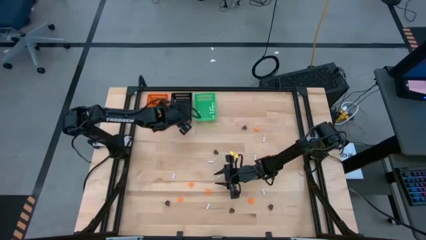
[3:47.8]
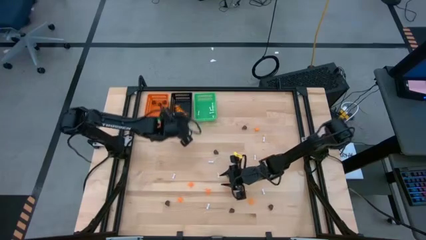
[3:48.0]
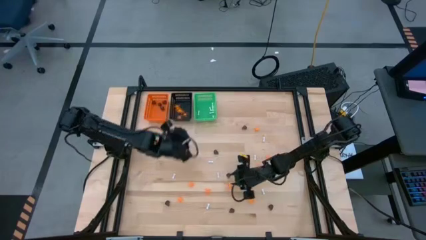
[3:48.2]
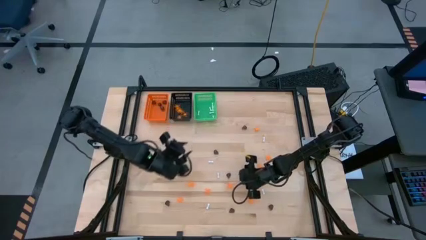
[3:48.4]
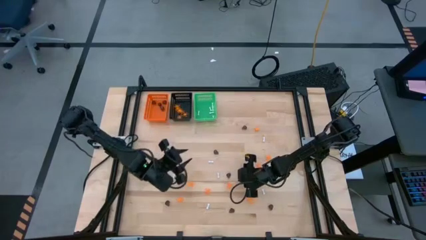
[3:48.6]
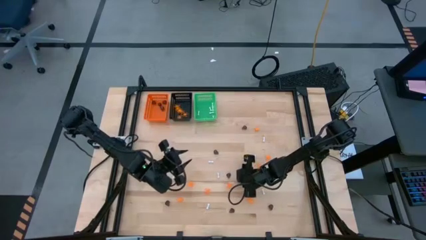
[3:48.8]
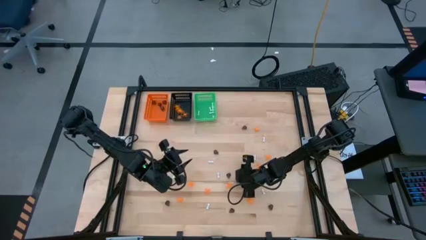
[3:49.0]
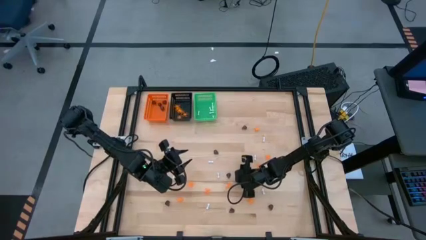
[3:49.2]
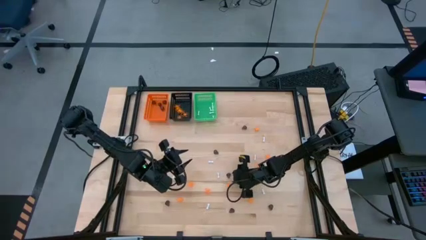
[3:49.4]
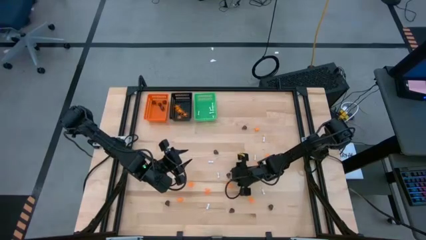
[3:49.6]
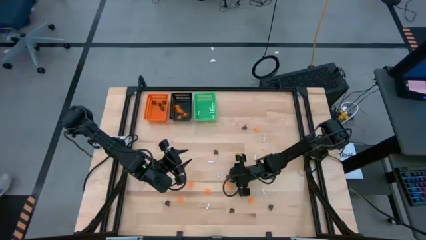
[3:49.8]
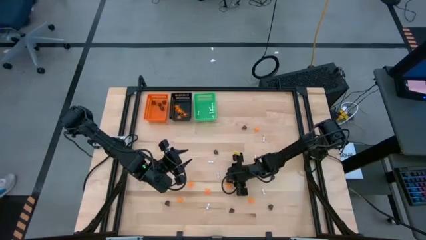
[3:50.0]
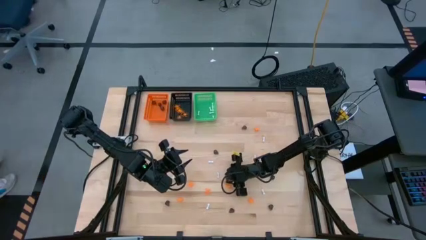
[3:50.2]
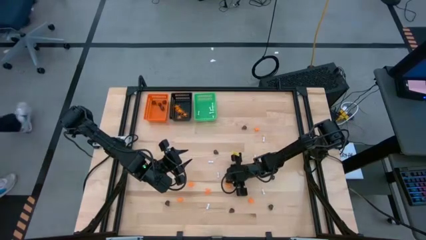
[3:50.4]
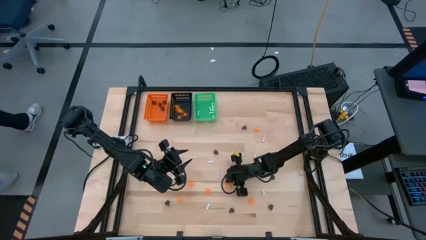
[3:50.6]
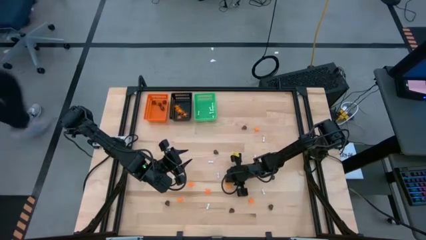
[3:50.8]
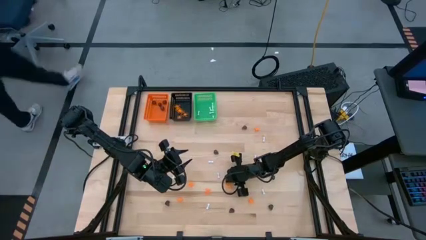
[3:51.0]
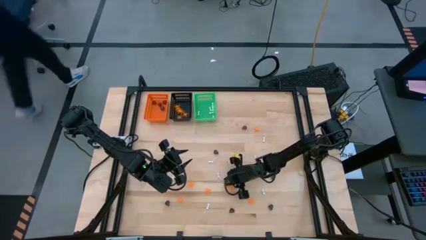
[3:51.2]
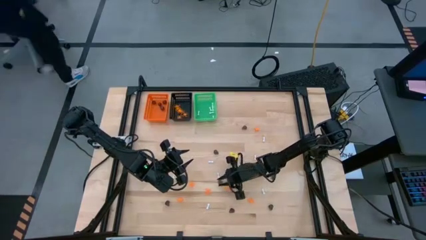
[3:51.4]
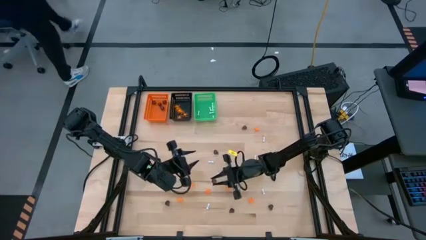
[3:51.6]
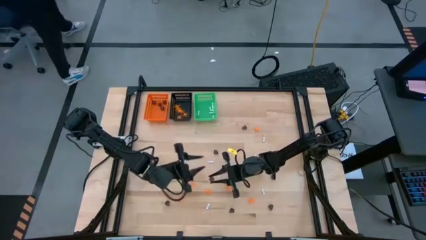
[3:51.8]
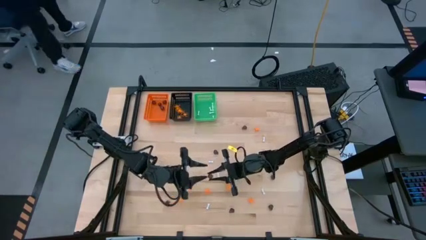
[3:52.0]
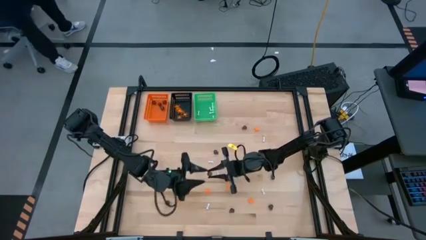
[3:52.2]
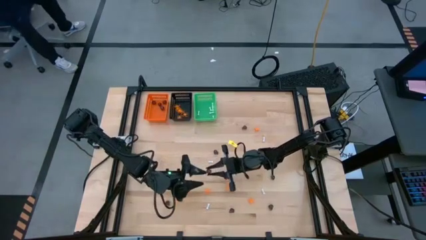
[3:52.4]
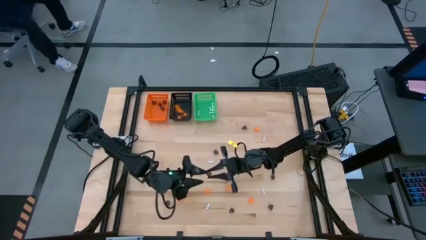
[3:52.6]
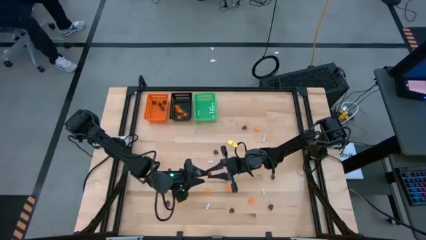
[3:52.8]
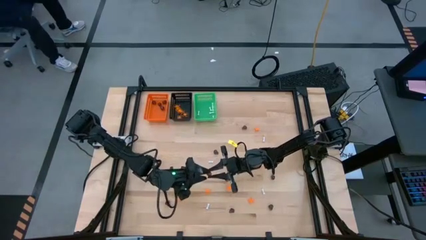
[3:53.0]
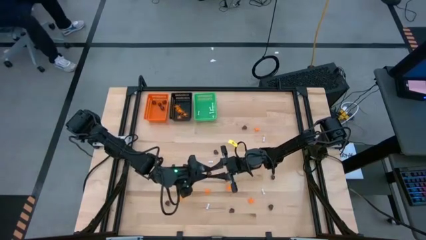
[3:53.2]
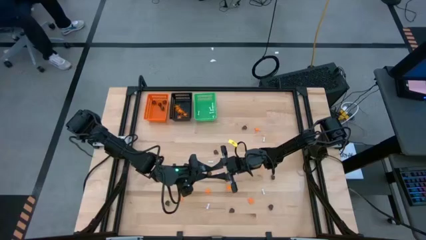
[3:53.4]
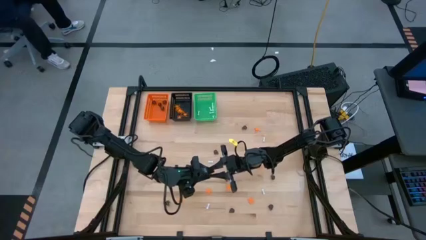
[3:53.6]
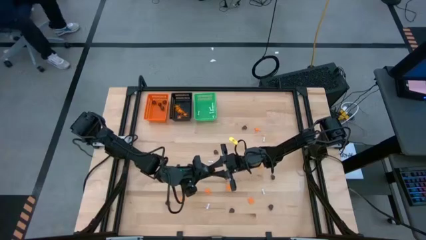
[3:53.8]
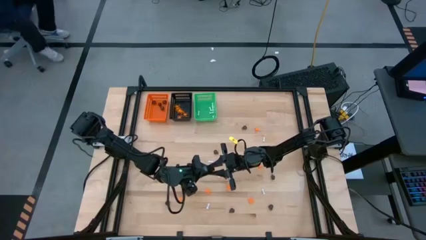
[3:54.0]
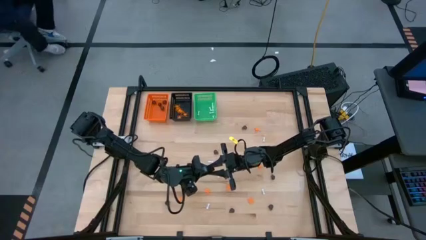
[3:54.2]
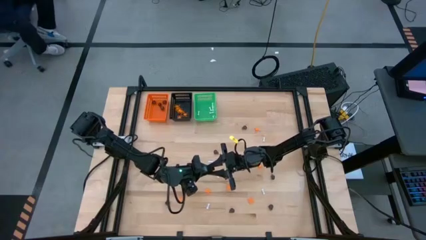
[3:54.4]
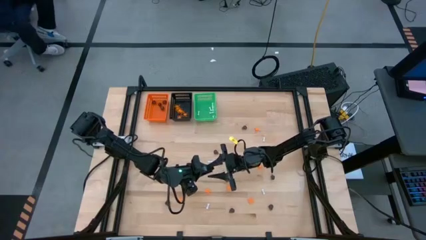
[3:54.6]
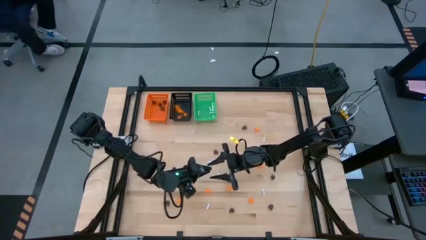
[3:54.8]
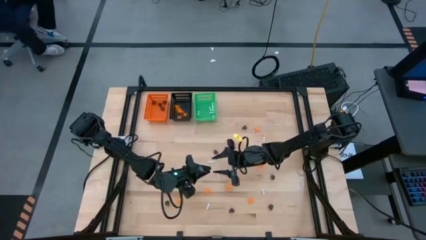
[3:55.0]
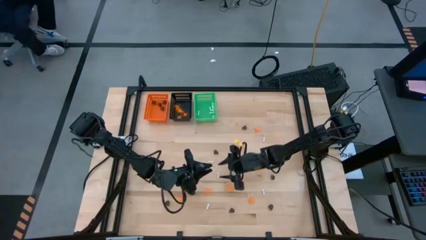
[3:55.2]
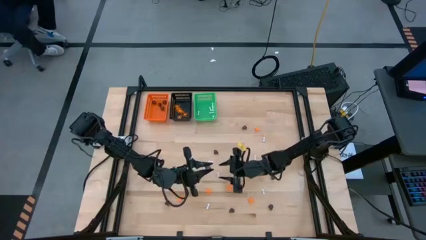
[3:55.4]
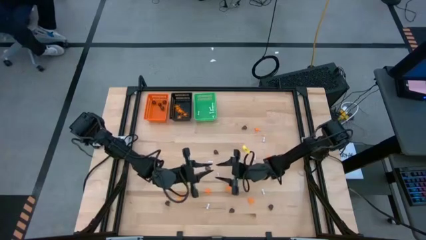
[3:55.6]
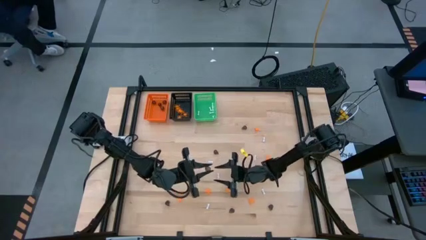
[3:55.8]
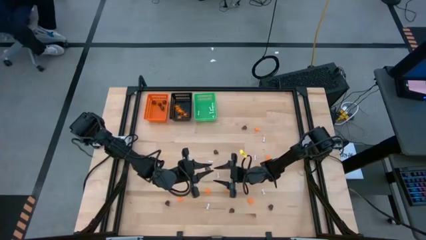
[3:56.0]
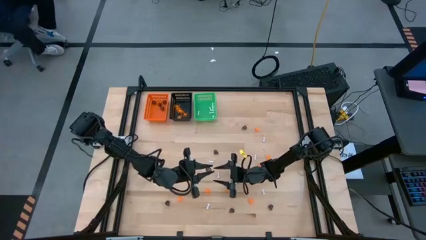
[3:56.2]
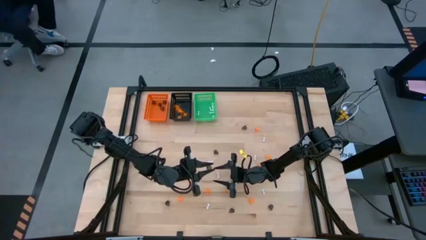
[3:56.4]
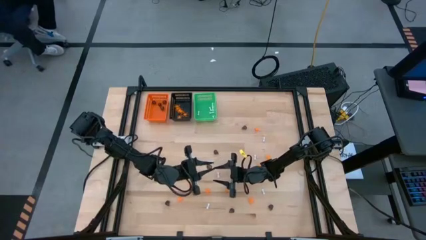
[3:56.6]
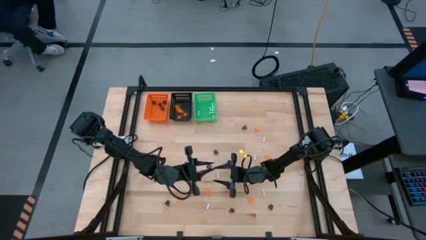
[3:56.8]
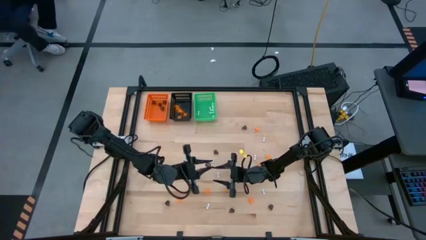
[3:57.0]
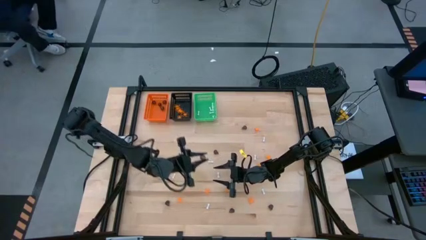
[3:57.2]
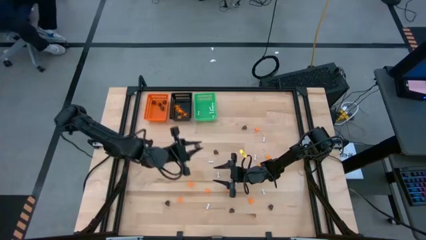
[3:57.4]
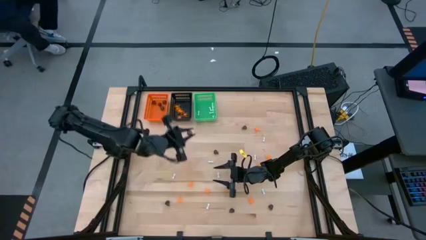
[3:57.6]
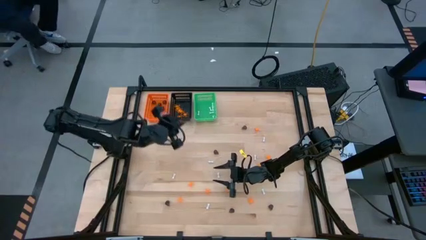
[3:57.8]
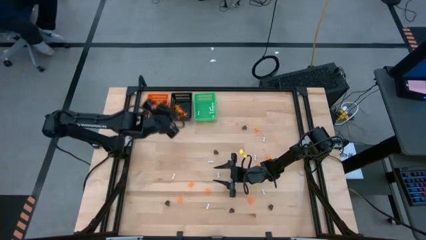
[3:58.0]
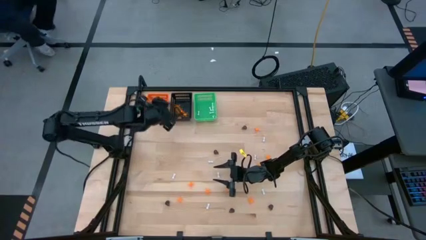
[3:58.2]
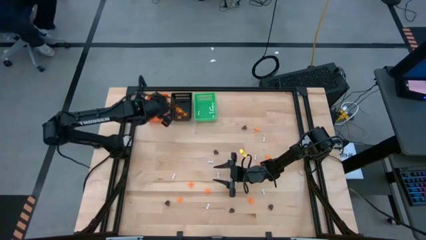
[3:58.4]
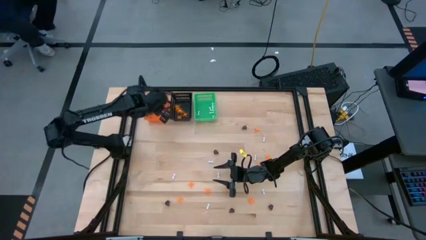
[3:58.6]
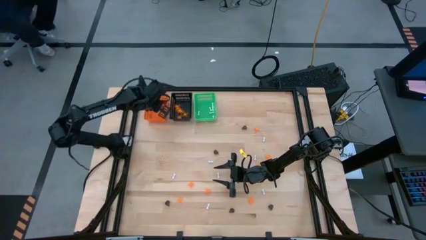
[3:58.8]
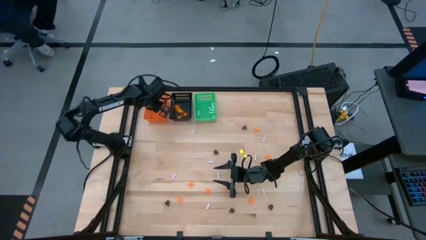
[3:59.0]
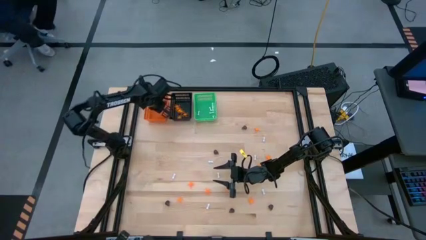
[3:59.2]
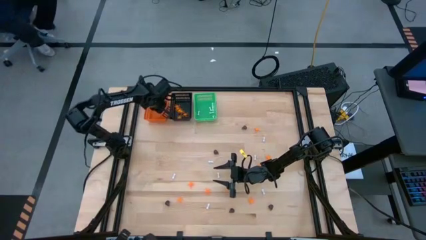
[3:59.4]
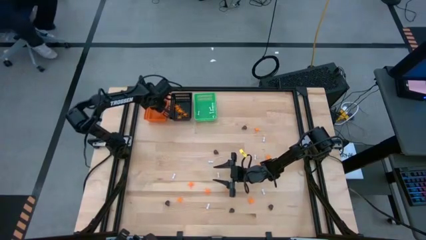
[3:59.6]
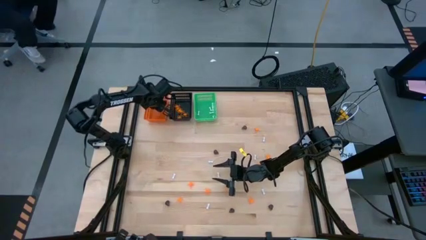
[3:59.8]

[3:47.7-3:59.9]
Task: Sort Halloween decoration
Put the black skull toy into the orange bin

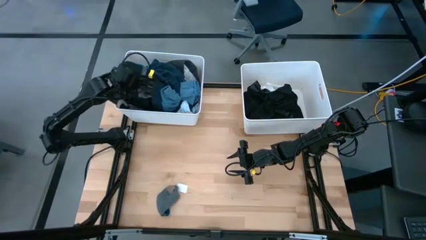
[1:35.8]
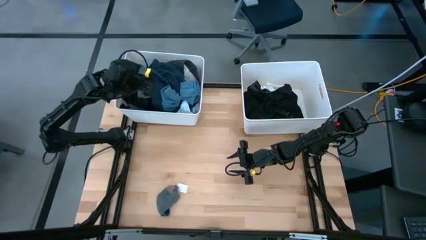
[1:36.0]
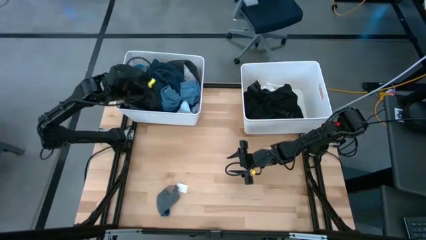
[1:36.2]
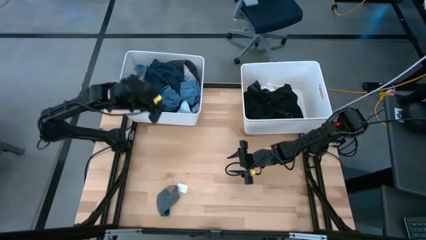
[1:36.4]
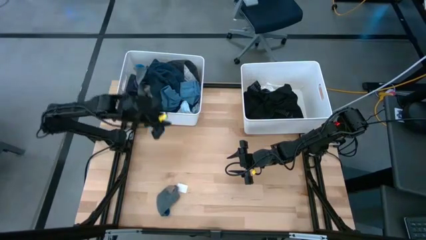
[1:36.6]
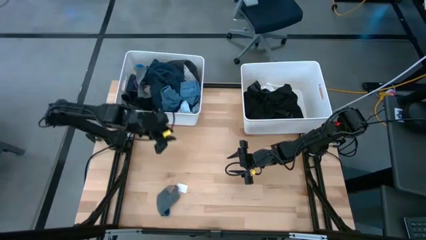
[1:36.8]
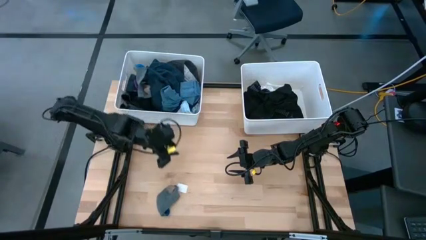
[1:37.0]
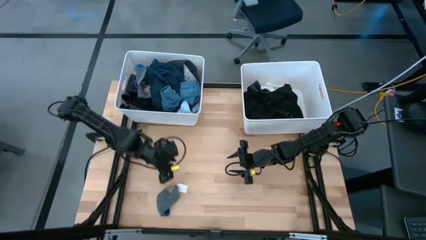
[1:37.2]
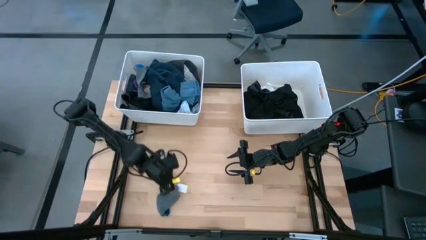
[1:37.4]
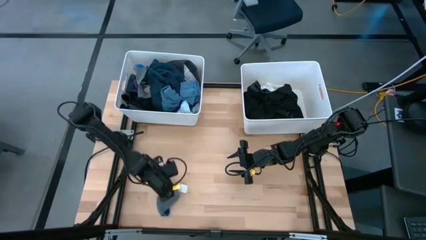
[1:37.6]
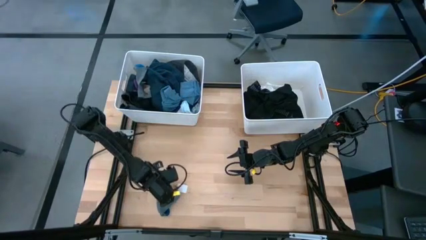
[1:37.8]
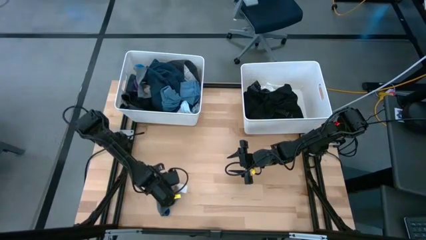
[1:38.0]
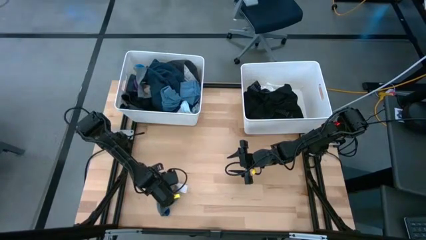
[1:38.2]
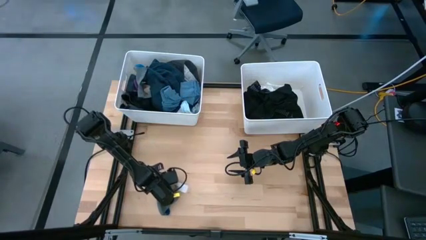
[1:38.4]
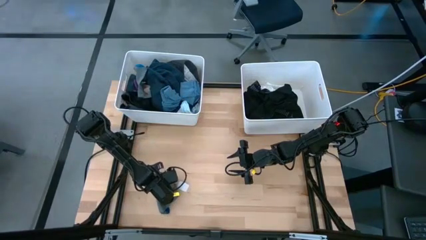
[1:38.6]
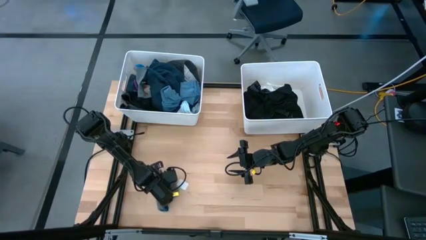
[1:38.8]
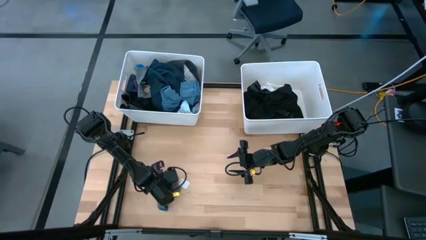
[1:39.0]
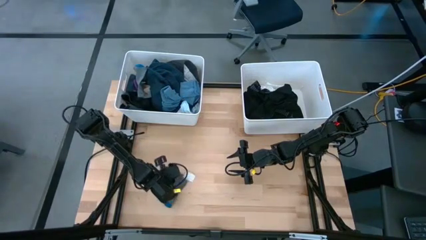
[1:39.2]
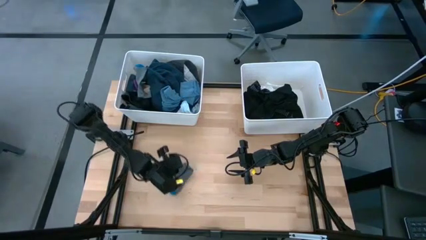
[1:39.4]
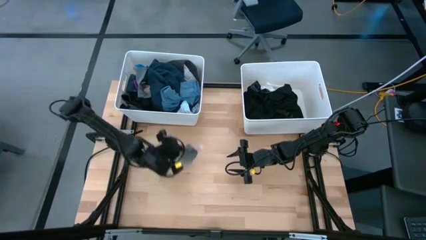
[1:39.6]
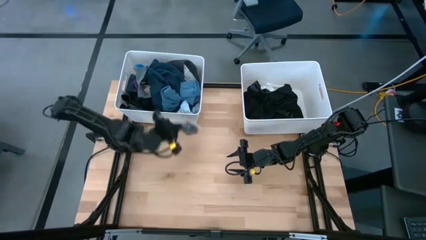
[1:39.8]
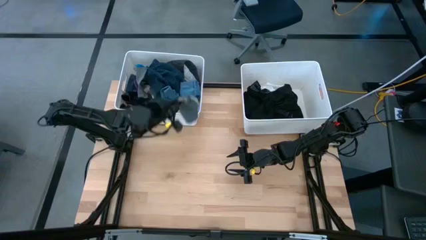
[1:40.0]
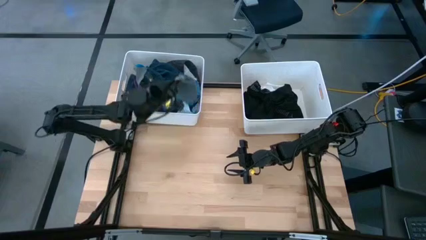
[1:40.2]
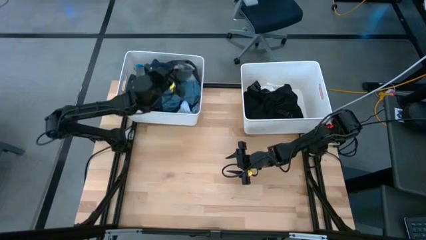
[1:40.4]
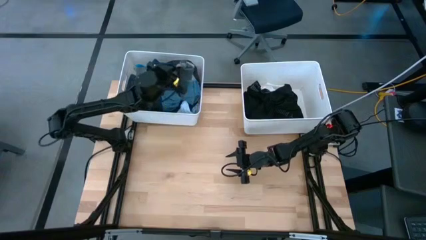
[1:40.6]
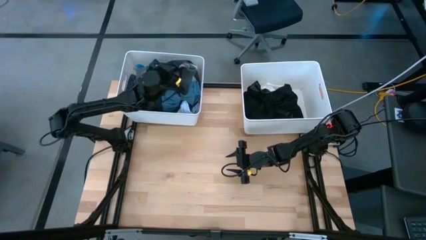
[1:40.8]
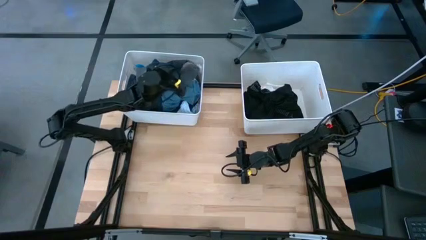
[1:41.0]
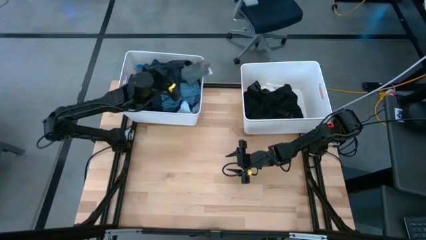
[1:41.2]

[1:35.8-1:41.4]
Task: Sort clothes
Put the gray sock into the left white laundry bin
